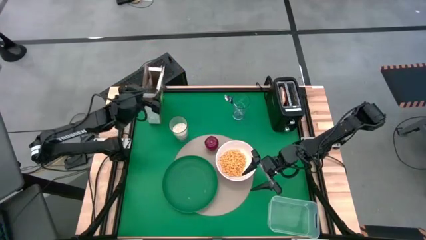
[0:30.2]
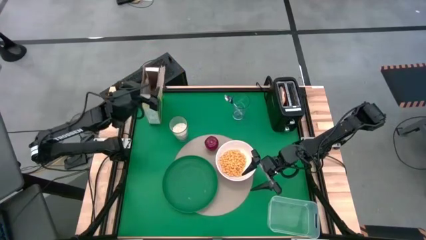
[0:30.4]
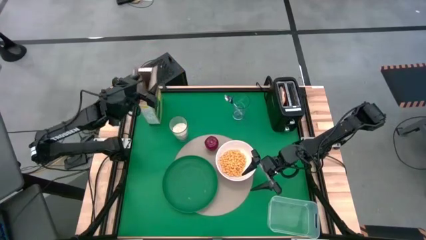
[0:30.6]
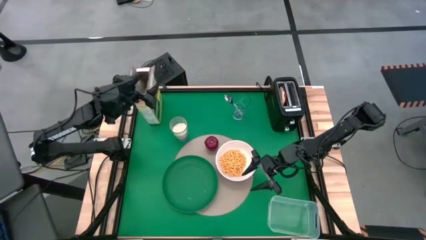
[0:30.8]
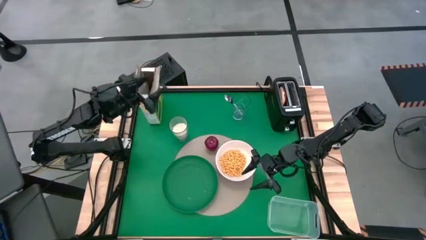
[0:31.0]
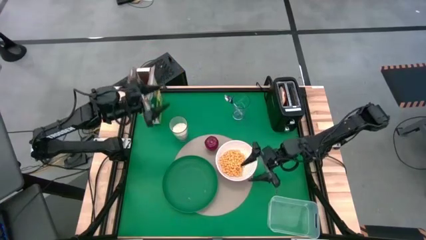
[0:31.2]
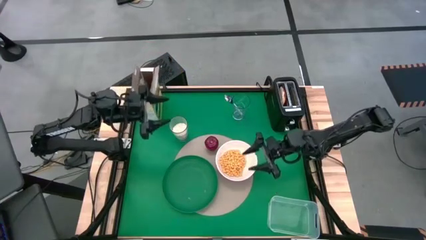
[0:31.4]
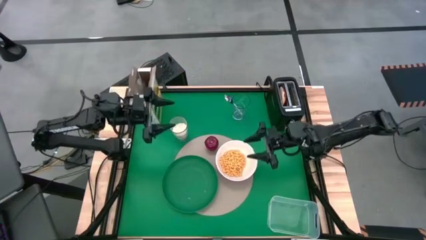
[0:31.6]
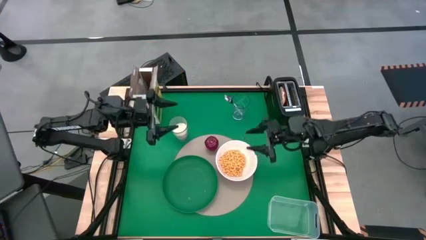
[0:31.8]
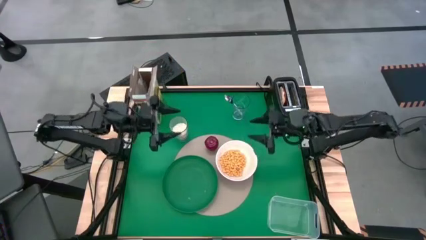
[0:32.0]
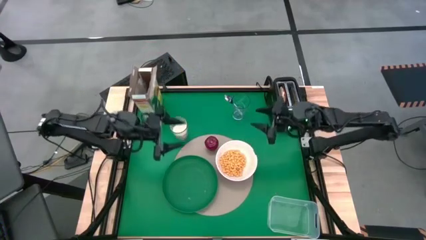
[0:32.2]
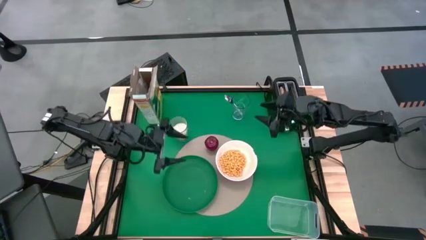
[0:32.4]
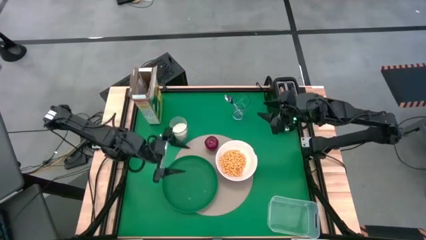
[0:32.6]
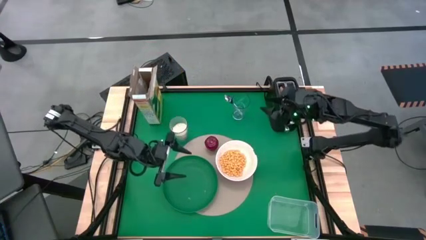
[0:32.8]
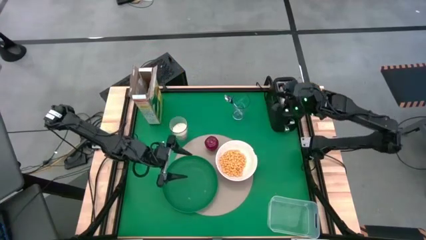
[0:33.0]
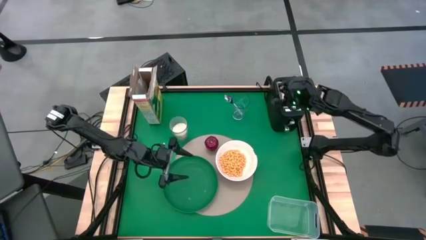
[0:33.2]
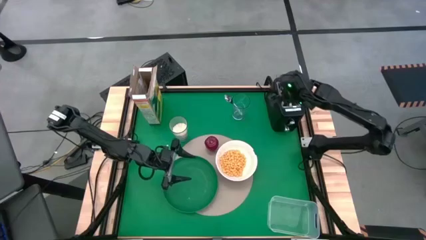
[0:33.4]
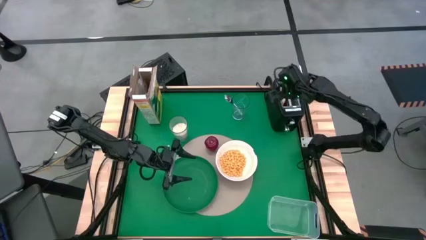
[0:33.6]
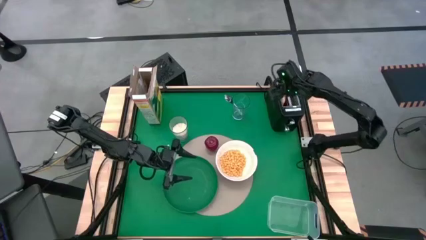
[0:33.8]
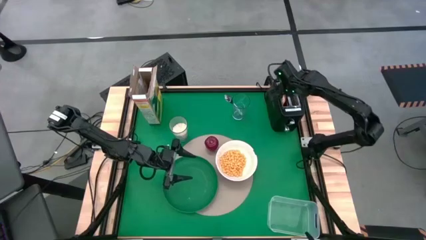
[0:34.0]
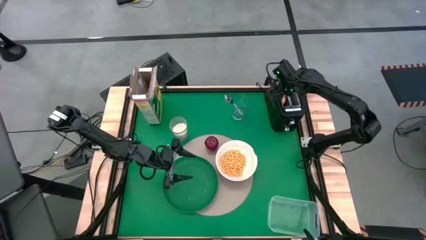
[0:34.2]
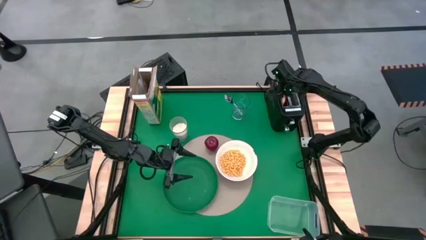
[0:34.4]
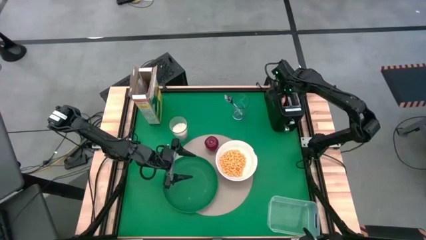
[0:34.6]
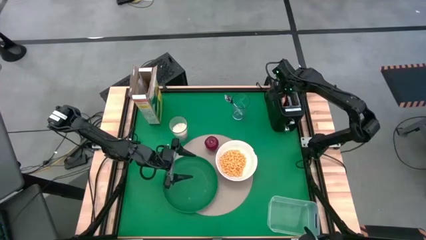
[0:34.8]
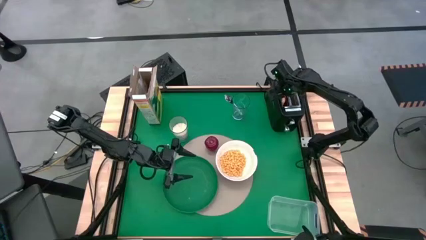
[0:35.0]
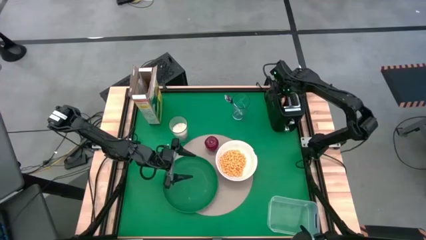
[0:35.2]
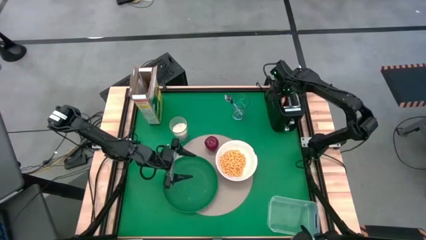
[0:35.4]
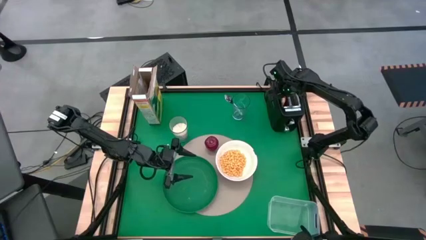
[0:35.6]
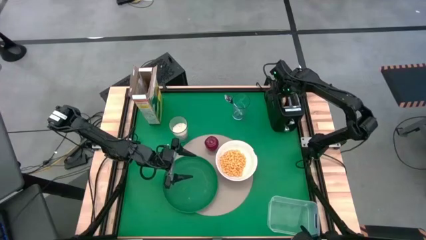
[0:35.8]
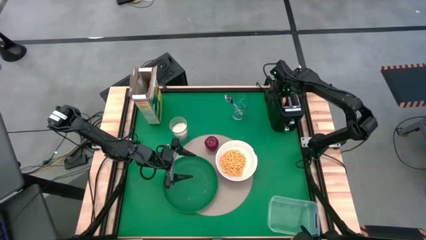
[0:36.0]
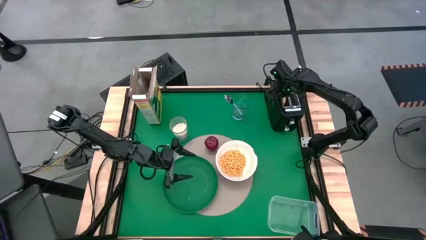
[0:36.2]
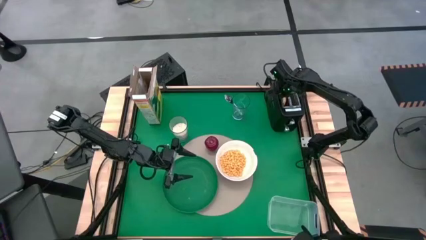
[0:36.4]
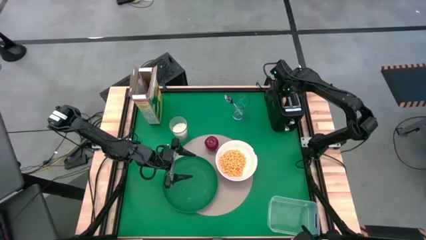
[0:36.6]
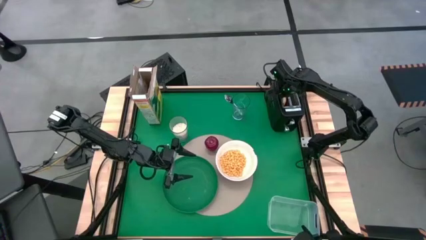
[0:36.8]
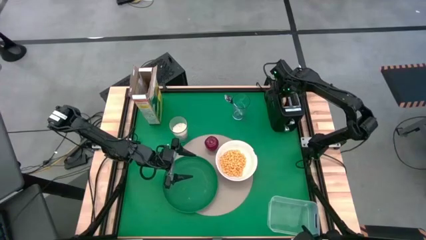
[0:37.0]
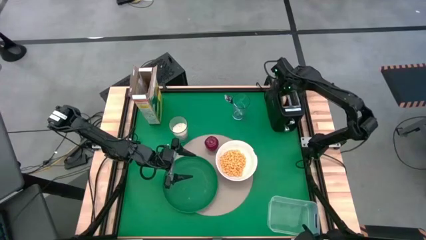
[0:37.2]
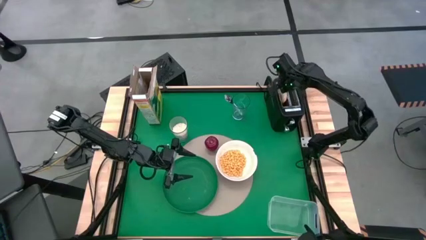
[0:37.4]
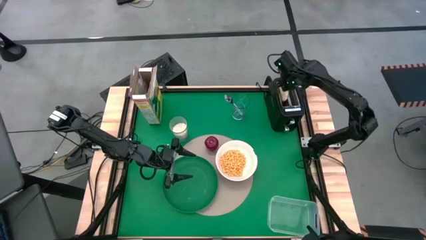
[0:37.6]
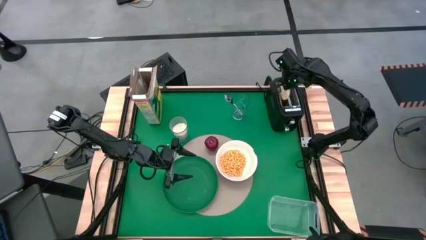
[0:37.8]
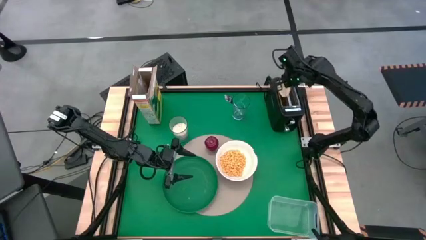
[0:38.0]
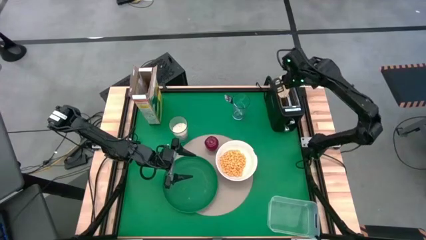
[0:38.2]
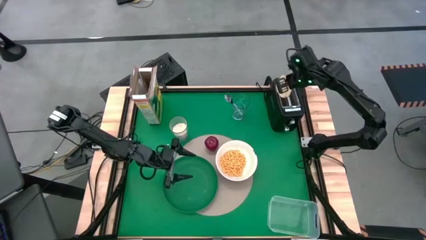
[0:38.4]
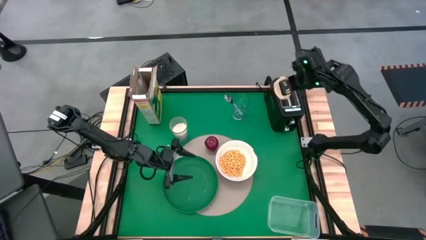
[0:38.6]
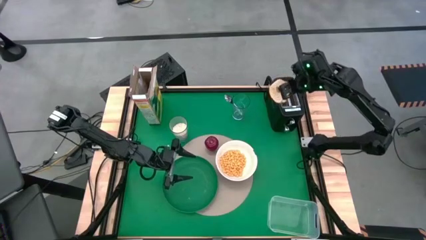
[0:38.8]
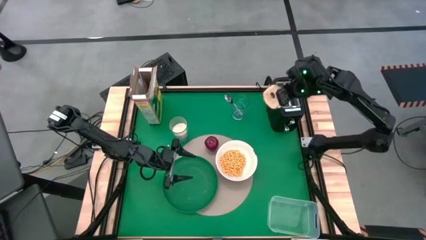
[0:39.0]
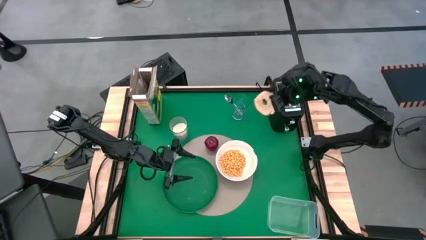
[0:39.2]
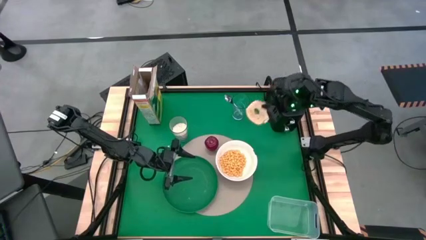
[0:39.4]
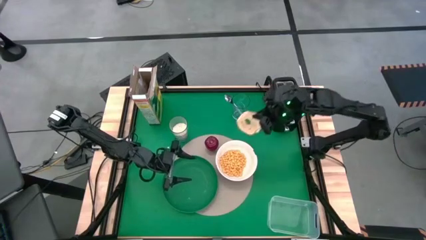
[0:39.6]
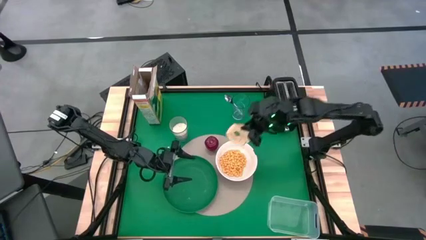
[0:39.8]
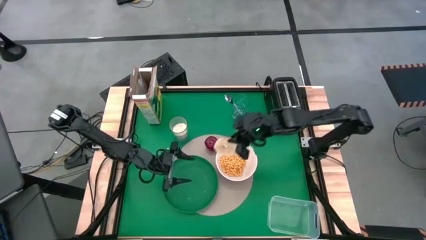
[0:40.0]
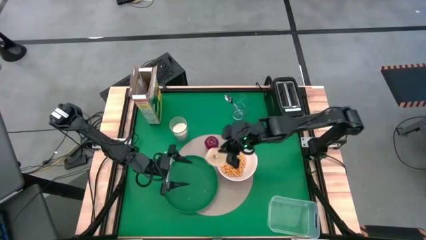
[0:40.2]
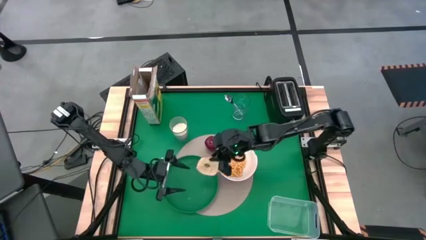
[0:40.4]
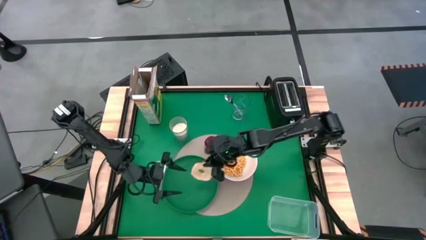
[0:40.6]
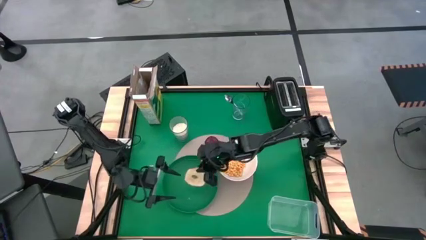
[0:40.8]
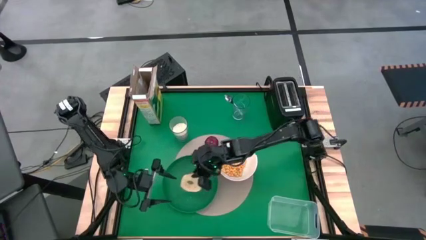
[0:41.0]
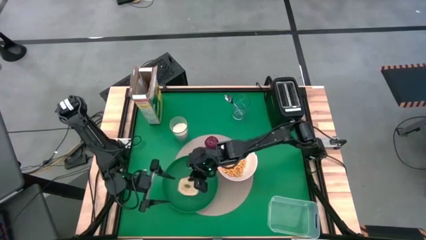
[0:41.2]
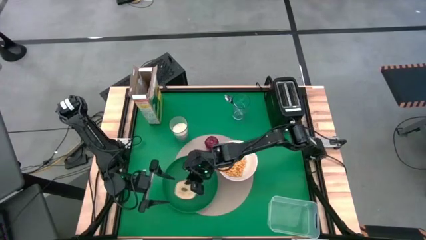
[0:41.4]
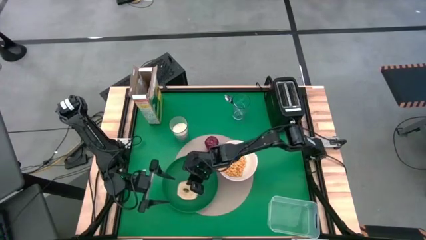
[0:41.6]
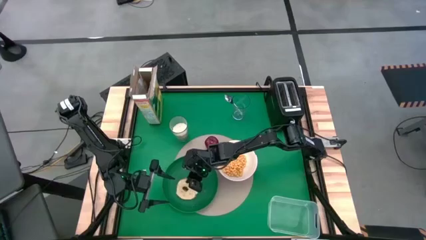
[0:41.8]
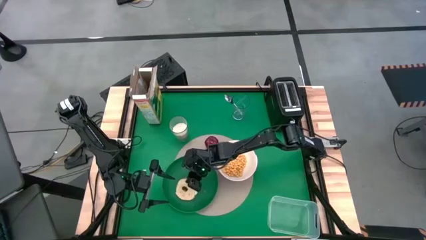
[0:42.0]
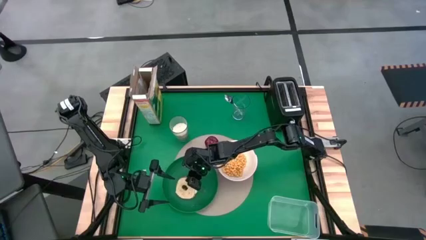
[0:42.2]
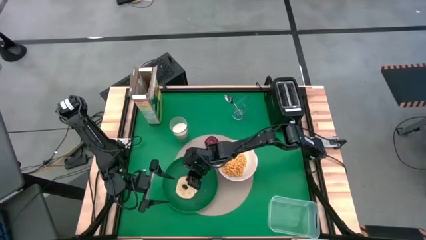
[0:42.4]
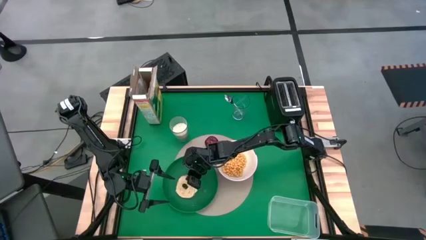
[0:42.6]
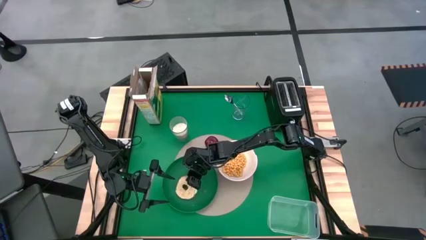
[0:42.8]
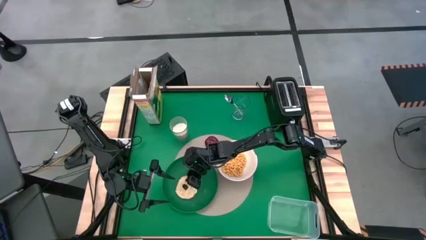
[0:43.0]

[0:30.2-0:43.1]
Task: Arrange a breakfast setting
Put the bagel on the green plate
